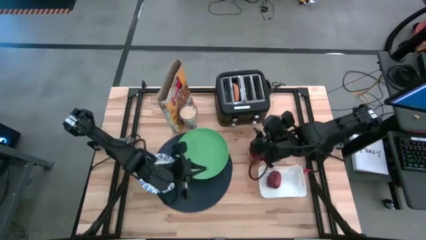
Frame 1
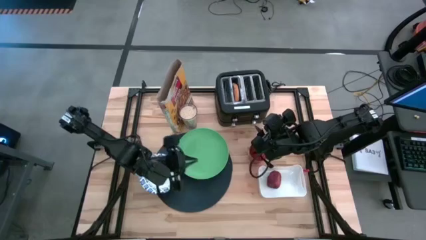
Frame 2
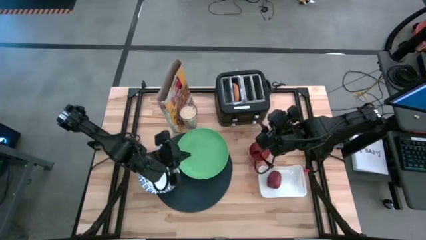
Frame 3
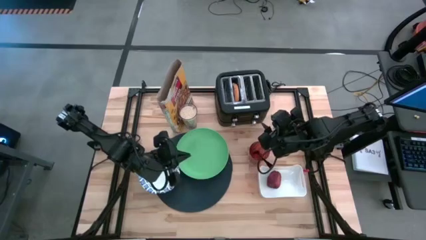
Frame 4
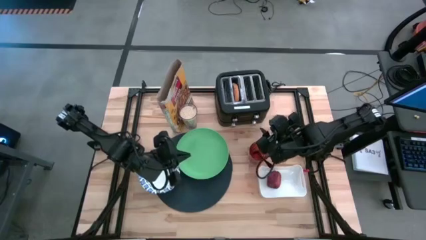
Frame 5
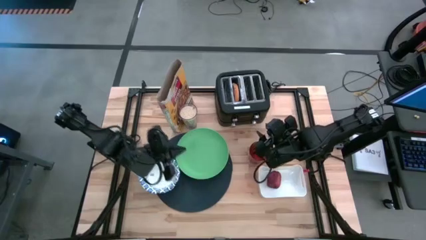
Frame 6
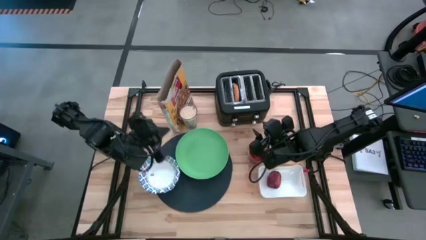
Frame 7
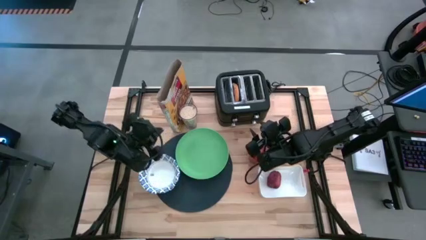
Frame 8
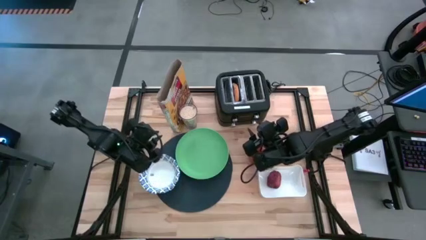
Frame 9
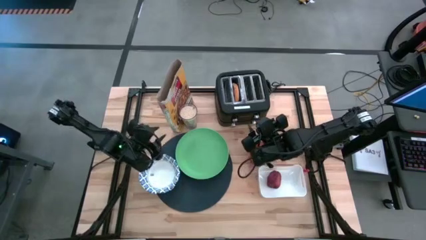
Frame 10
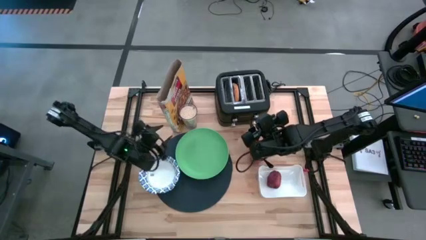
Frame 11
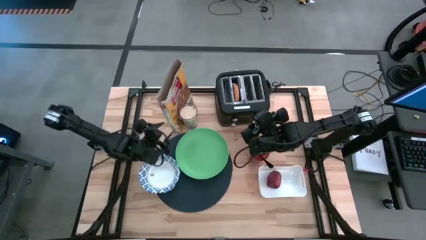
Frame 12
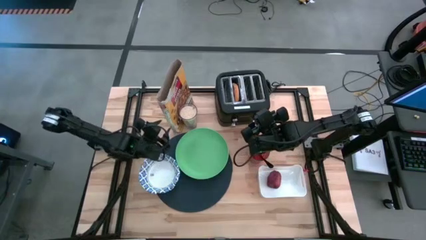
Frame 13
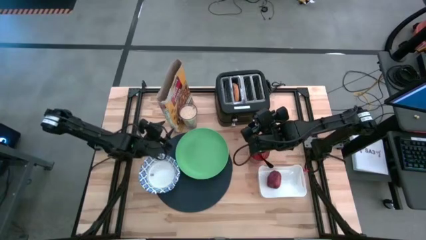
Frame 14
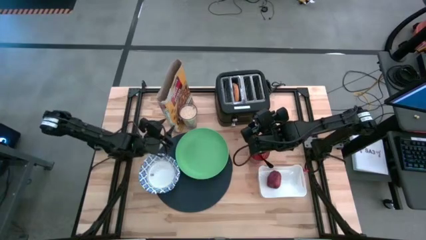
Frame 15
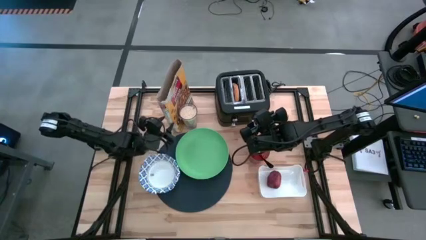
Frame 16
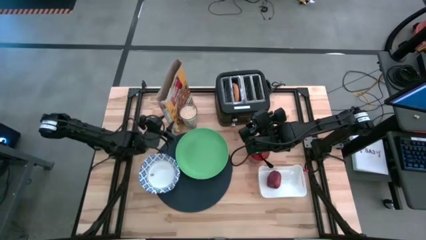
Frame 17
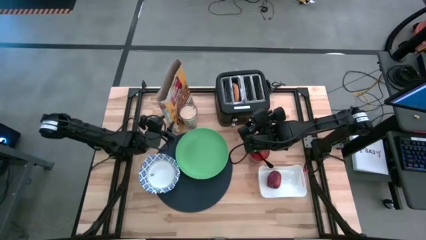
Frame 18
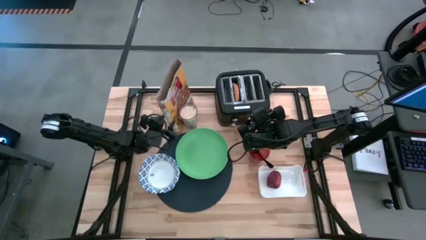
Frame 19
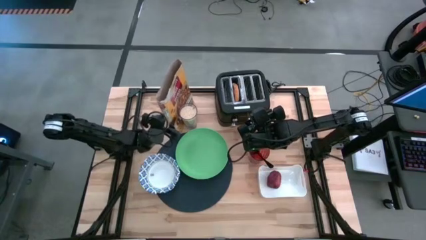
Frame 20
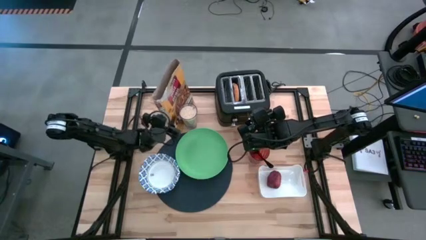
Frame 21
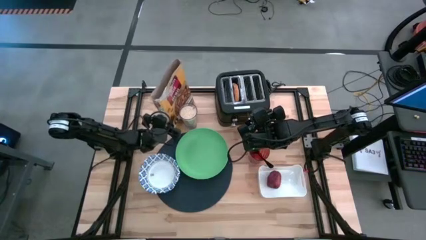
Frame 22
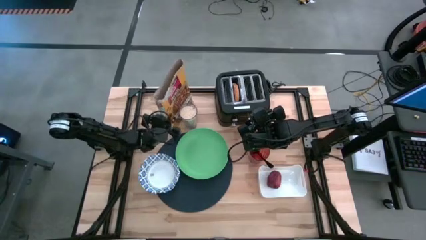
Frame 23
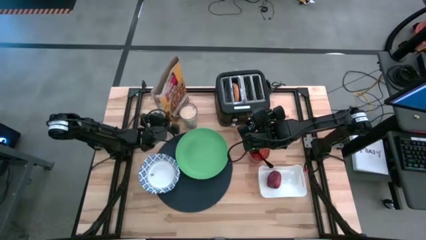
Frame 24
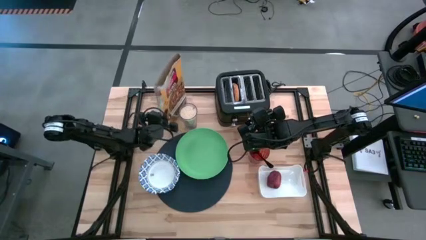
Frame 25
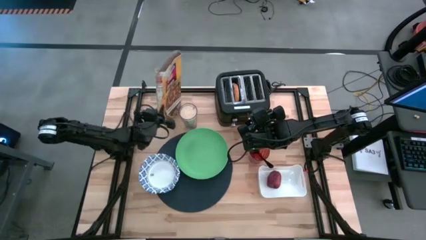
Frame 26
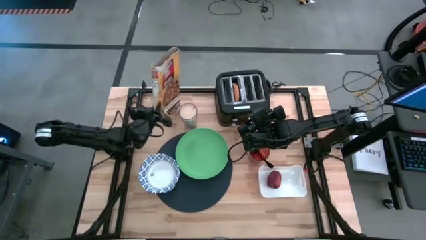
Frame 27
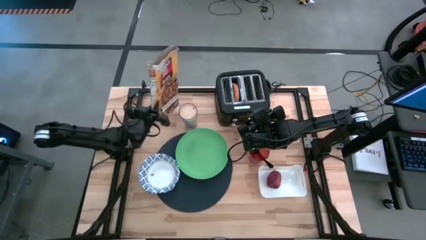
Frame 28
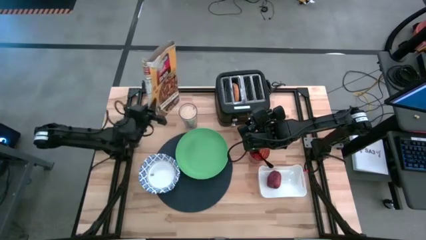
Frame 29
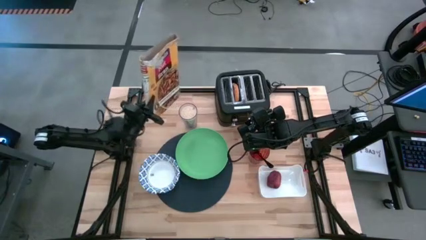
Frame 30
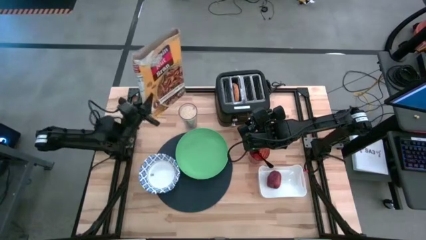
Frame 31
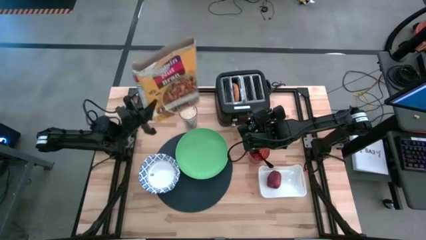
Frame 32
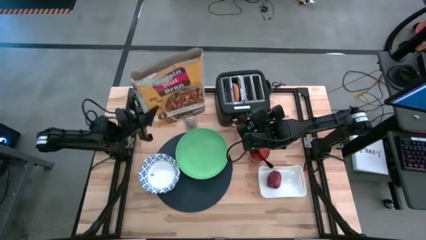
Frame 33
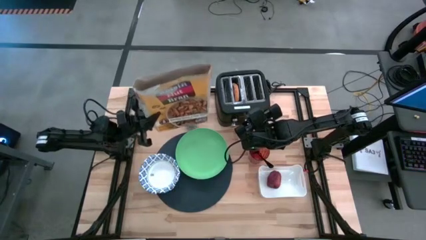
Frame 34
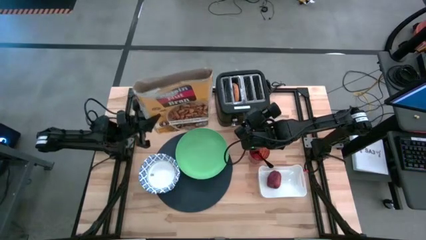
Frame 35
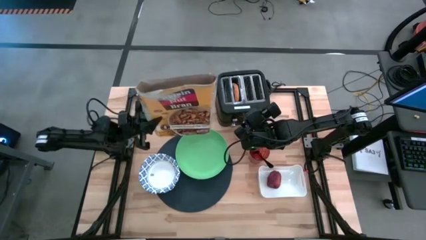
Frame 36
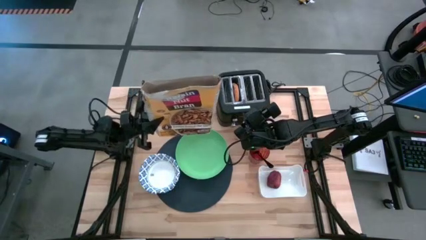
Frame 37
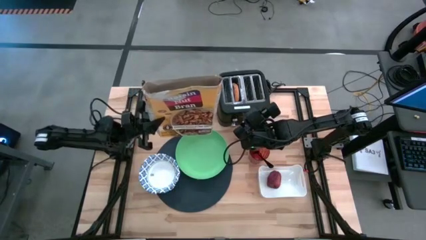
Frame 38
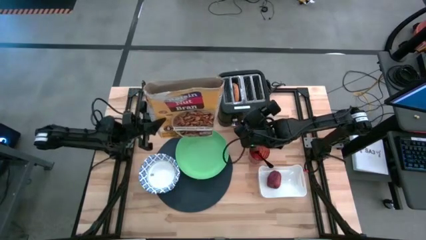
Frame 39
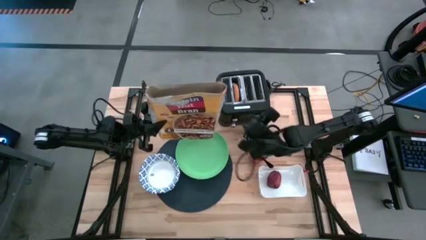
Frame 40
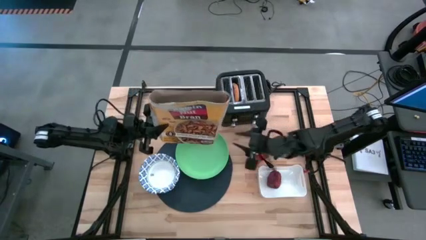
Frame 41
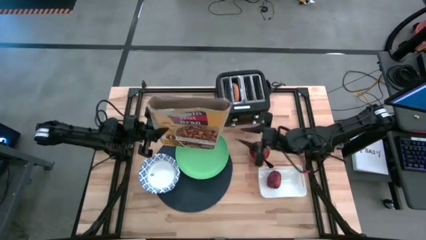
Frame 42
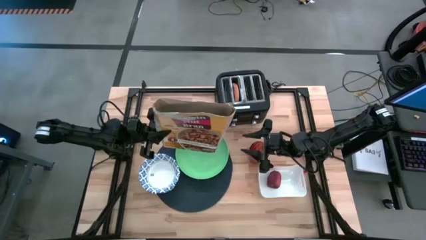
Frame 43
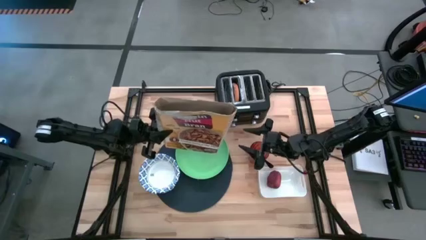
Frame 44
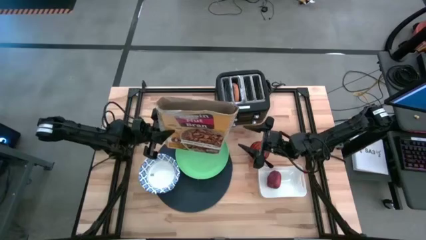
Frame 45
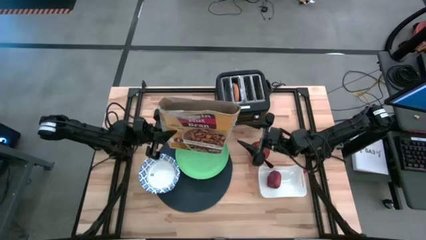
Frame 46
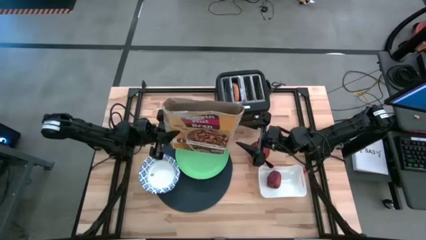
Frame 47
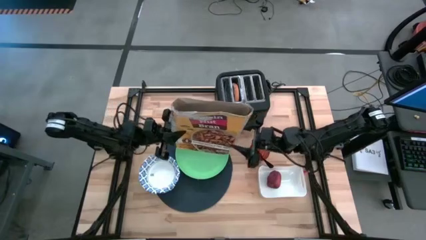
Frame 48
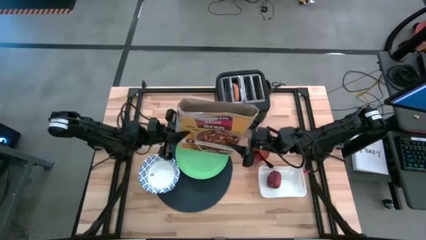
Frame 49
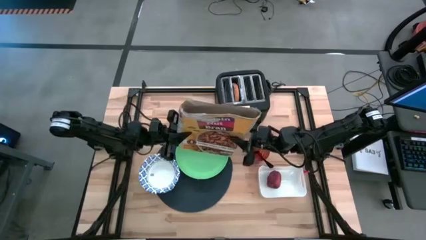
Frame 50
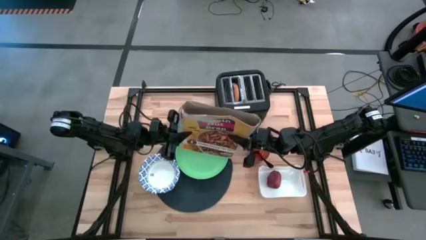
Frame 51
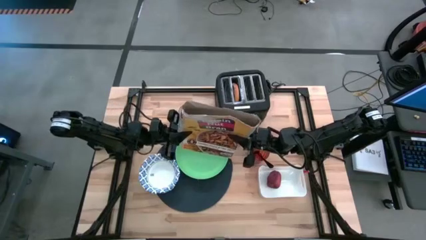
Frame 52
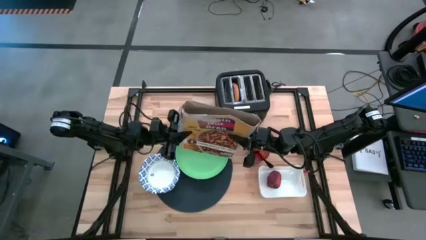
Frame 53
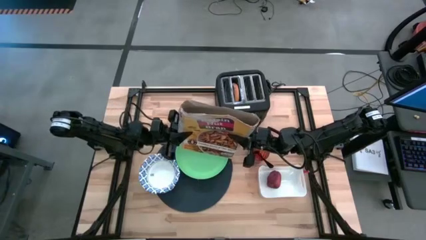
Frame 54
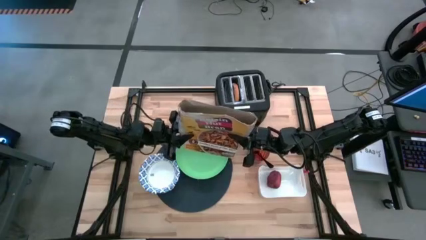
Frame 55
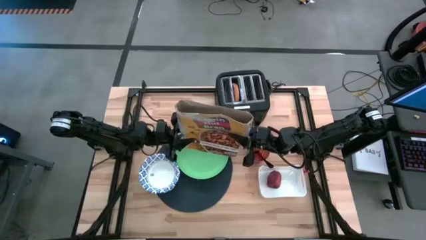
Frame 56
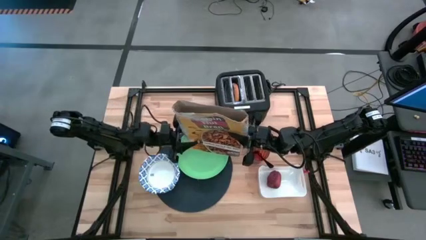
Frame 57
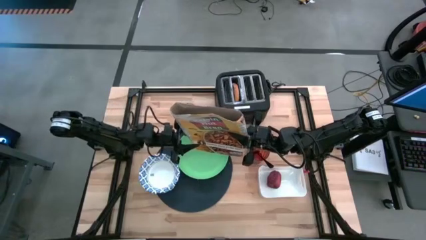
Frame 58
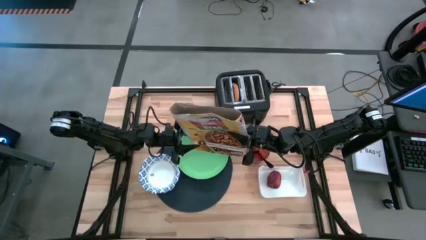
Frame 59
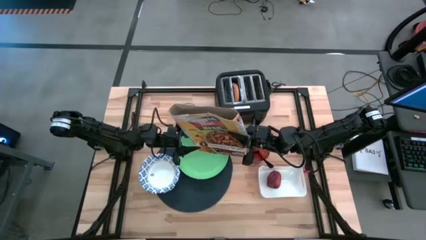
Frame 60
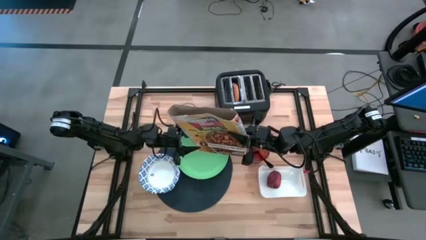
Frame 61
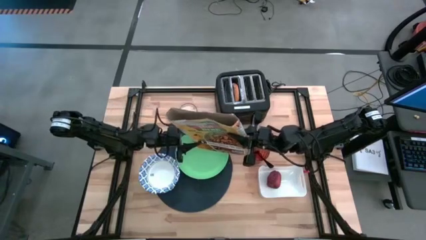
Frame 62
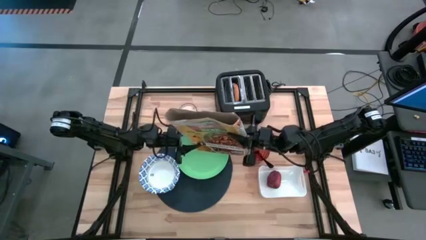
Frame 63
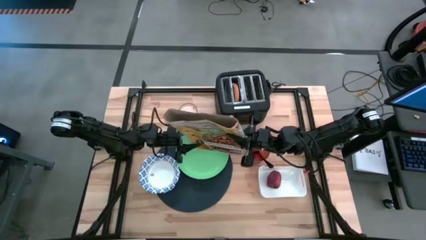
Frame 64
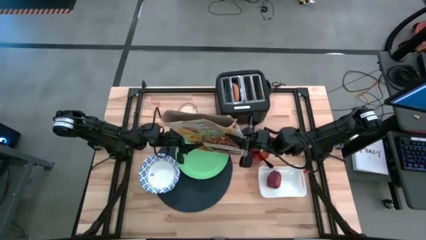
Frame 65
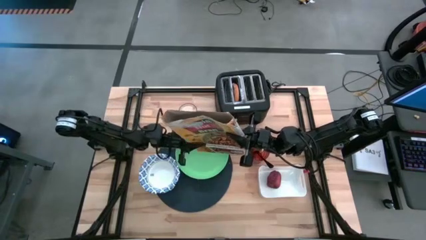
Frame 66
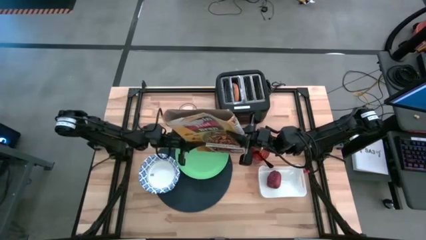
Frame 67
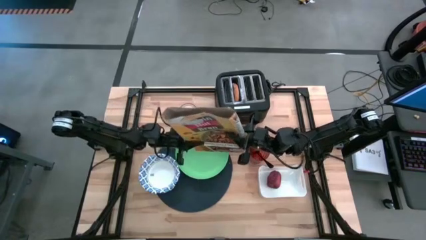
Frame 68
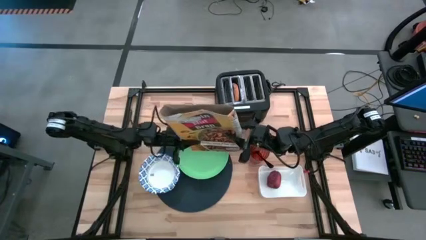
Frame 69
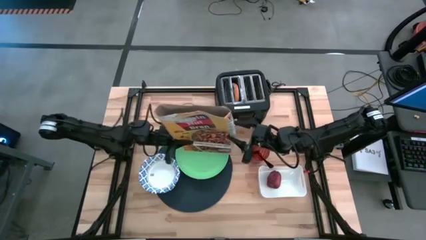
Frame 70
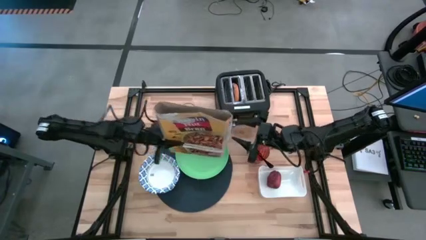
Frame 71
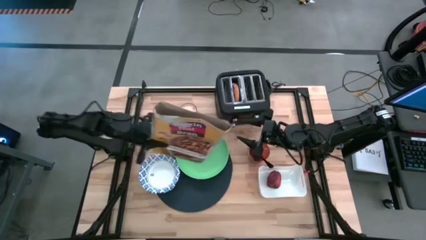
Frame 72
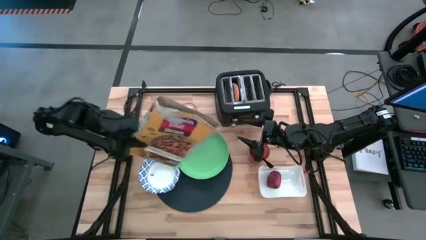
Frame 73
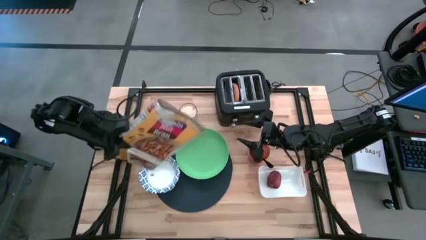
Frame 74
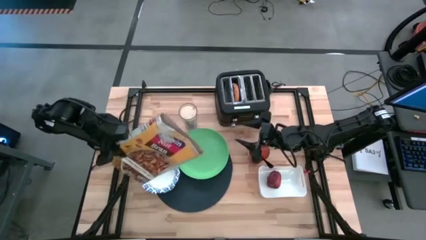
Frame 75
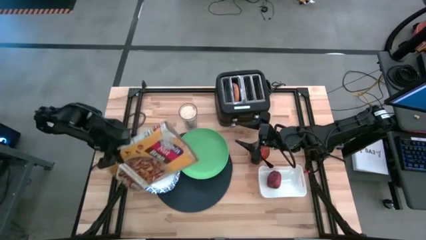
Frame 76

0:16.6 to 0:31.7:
Task: Arrange a breakfast setting
Pour the cereal from the cereal box into the white bowl
